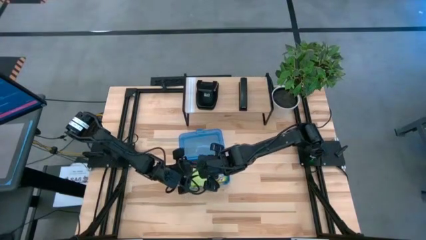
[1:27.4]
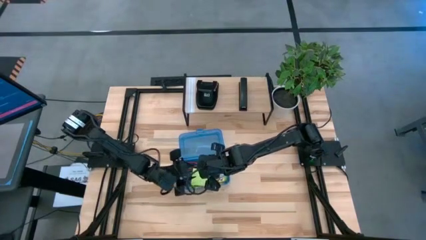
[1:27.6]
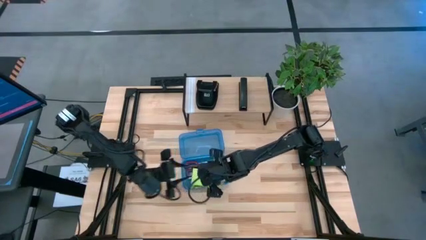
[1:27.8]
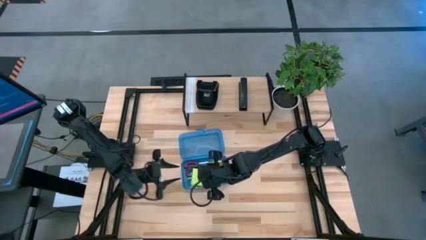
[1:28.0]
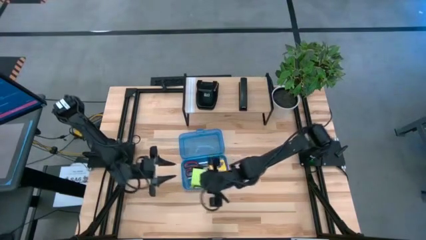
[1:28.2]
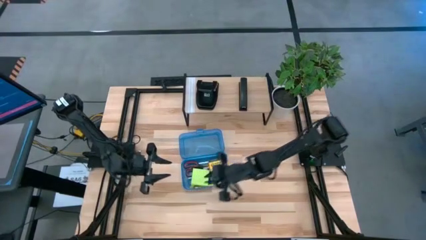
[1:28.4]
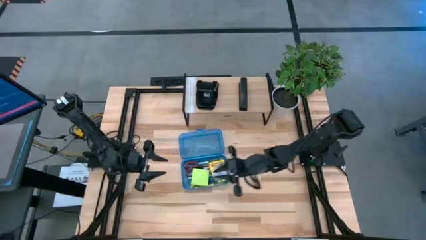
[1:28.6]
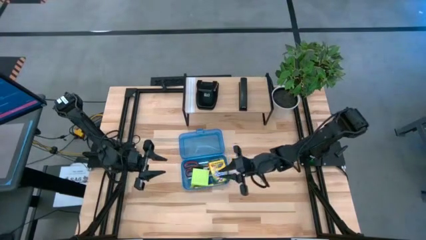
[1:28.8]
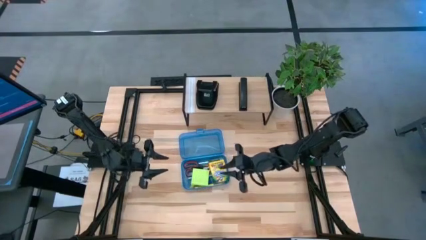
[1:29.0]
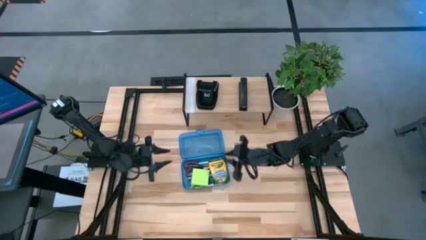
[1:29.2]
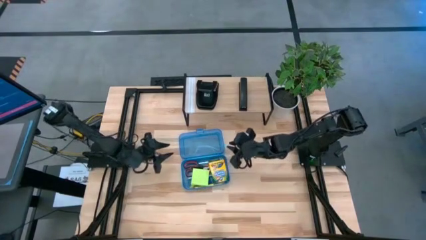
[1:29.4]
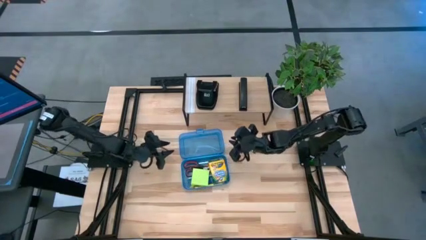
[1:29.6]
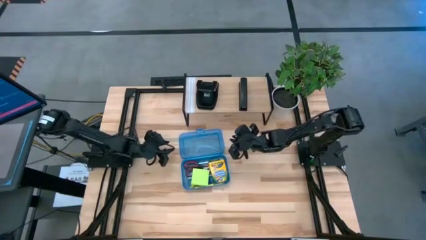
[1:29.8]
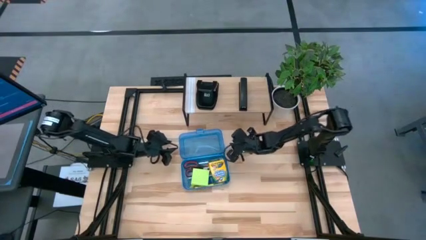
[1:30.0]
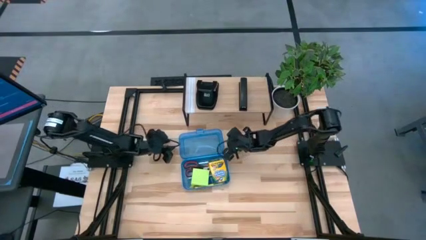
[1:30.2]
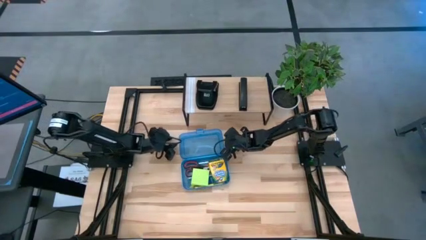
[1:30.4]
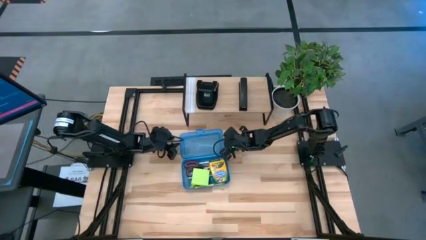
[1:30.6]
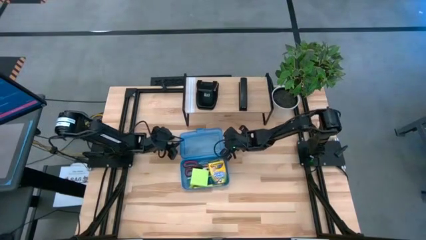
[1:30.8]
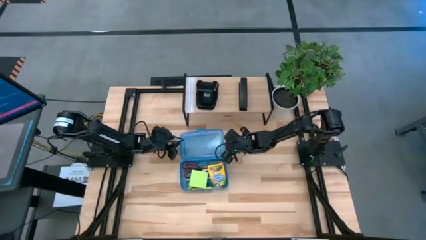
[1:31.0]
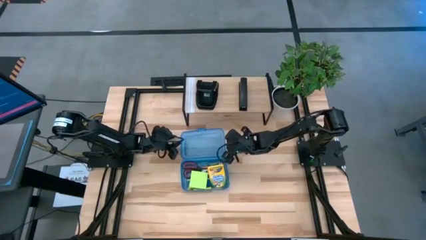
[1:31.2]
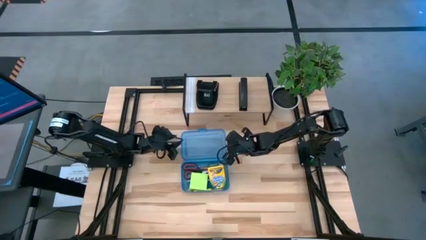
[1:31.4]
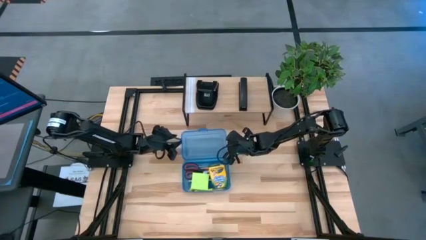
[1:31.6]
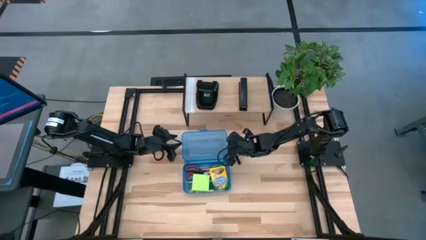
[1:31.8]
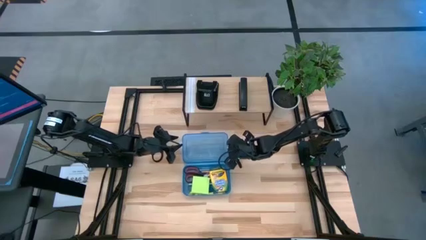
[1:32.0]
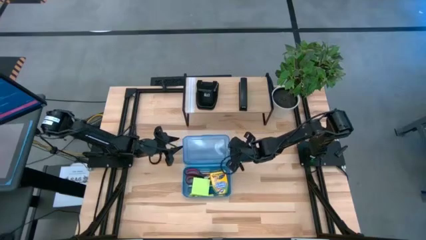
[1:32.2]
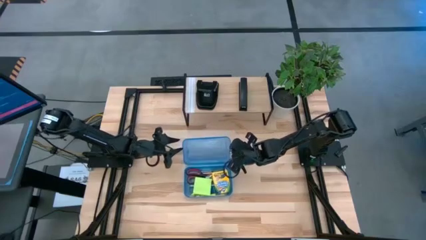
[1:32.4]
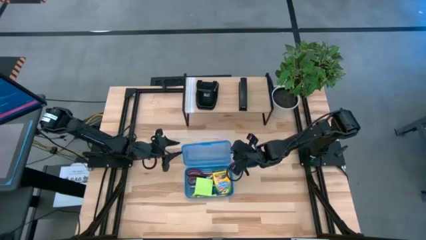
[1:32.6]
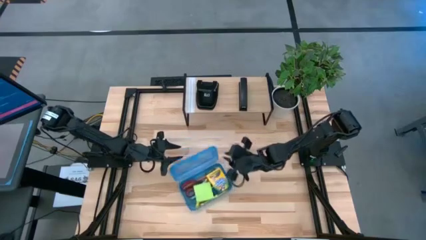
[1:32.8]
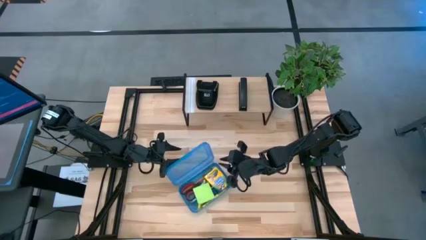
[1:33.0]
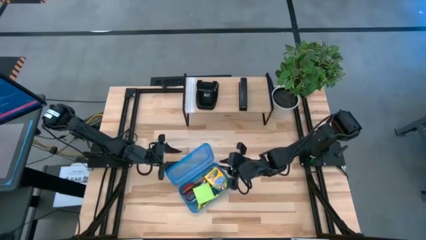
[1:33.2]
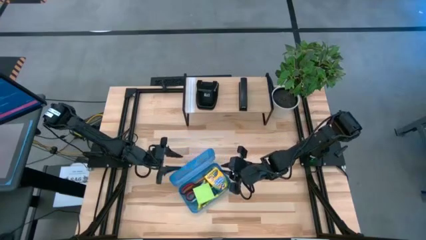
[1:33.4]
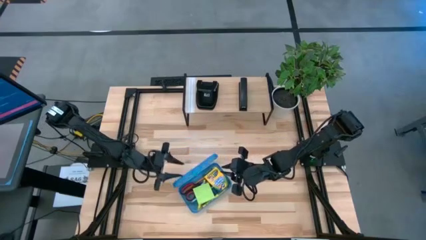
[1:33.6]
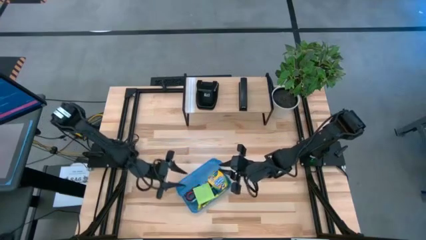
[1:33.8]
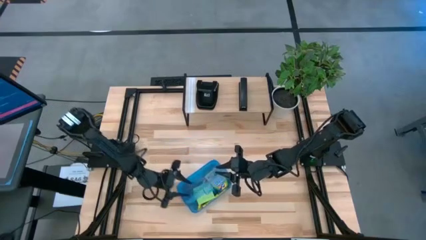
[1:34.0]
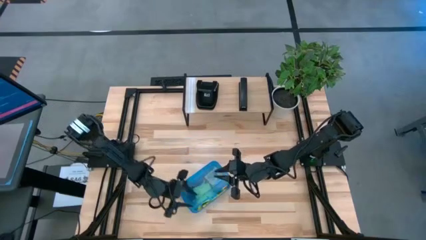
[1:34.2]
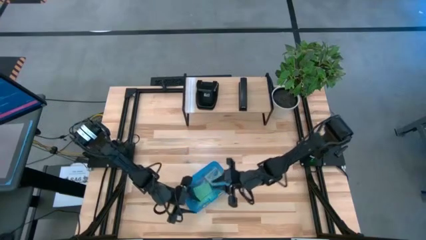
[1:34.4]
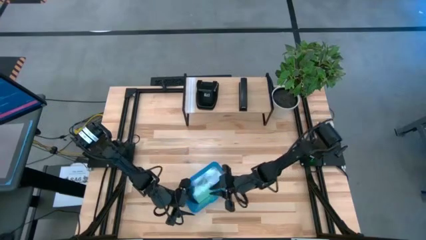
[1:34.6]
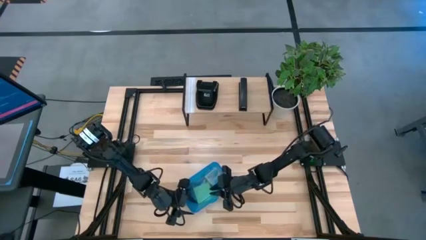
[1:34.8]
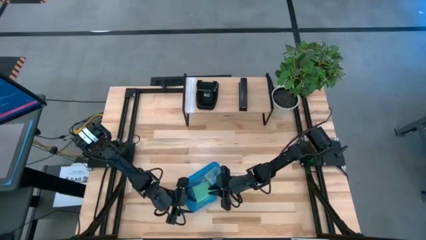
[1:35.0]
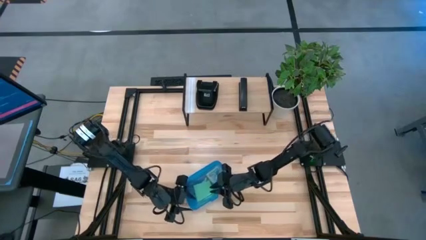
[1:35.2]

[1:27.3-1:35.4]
Task: Pack school essentials
Close the blue supply box

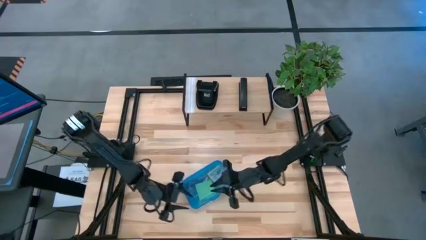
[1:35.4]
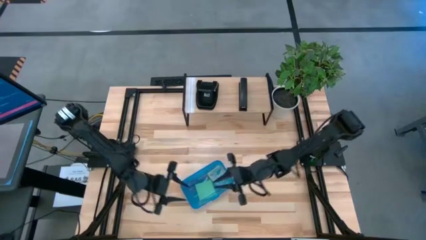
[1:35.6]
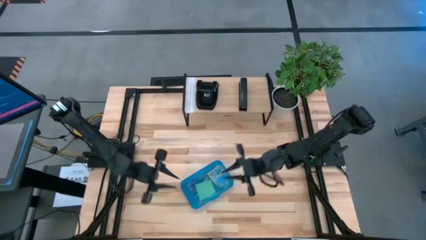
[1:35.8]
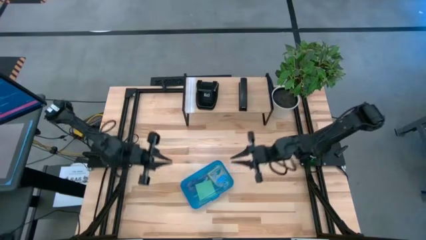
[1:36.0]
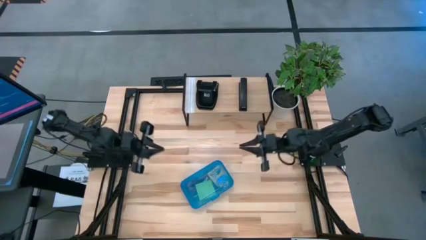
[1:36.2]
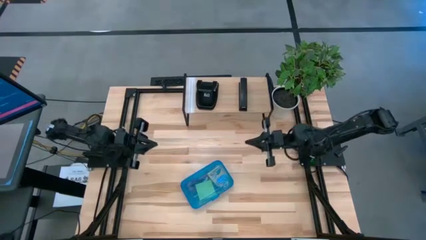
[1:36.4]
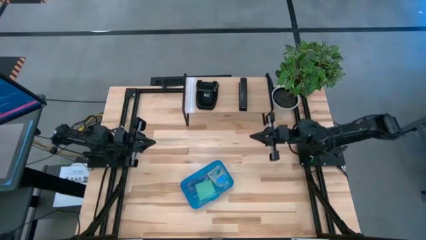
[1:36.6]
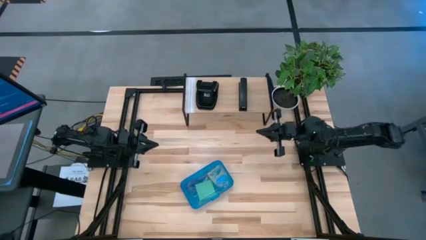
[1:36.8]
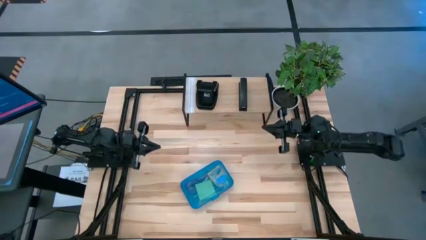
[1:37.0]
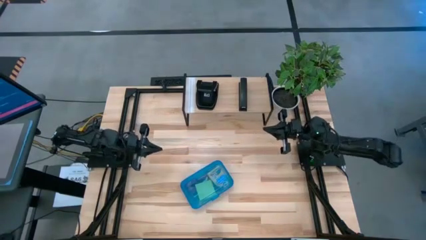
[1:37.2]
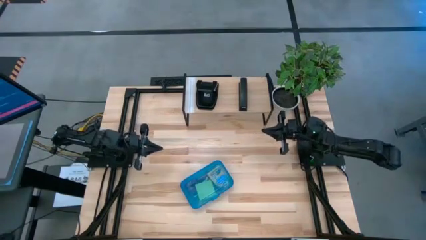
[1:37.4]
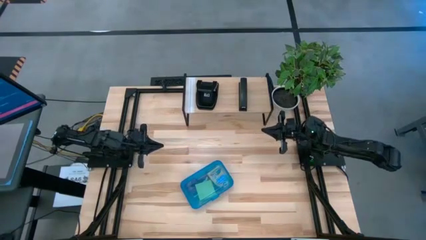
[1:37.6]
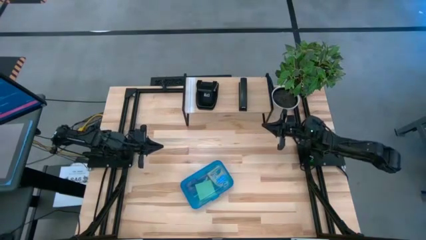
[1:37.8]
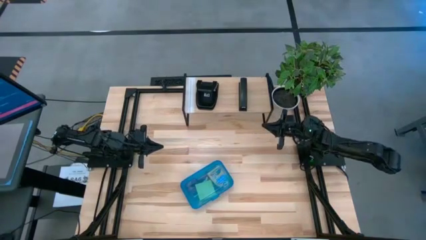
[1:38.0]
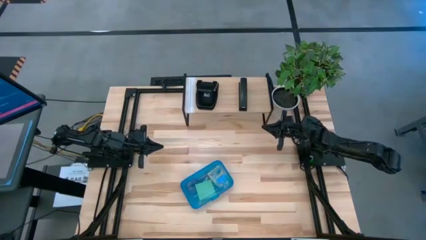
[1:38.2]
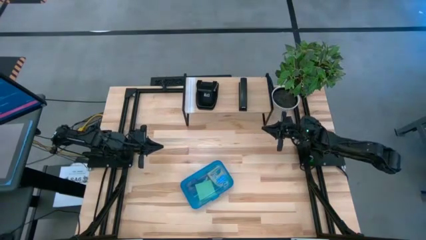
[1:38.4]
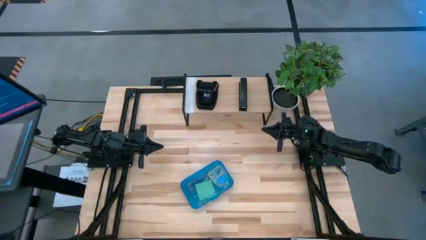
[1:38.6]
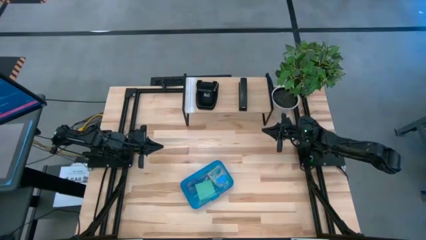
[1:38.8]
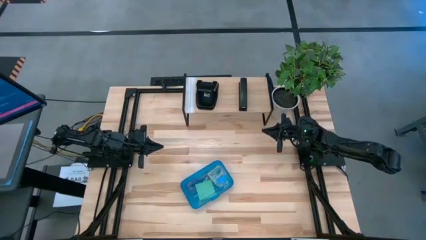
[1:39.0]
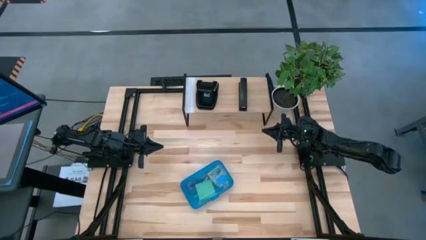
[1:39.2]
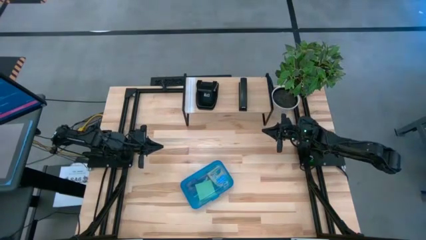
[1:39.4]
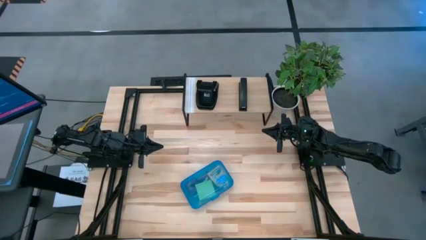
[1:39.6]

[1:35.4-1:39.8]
Return to Home Position

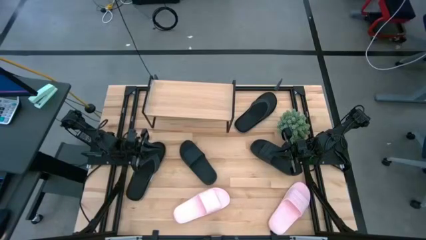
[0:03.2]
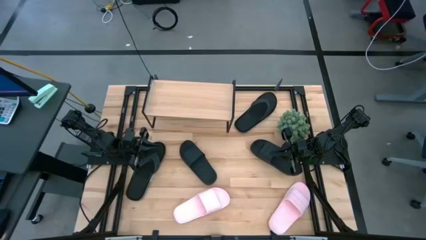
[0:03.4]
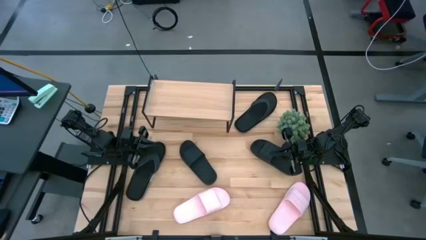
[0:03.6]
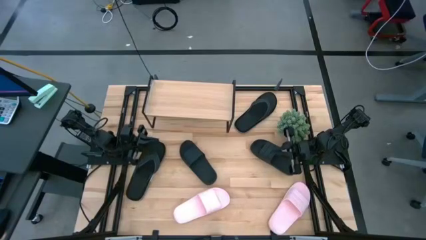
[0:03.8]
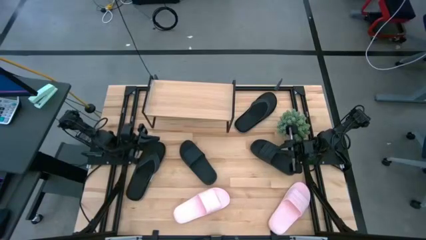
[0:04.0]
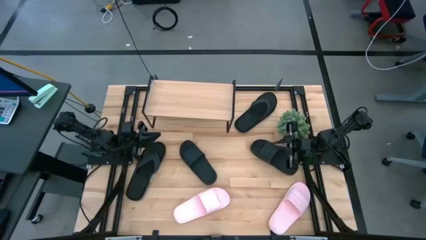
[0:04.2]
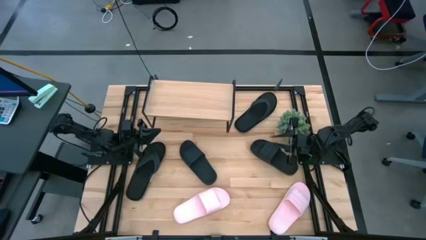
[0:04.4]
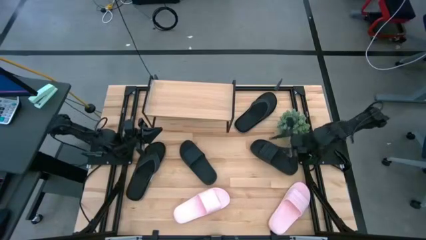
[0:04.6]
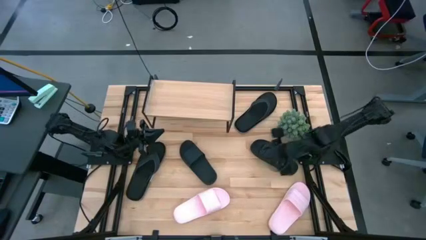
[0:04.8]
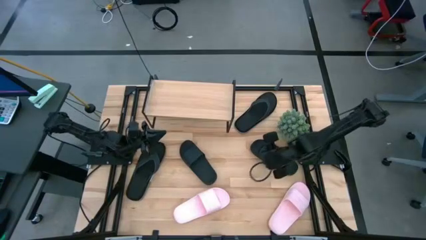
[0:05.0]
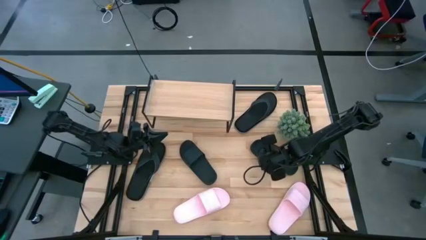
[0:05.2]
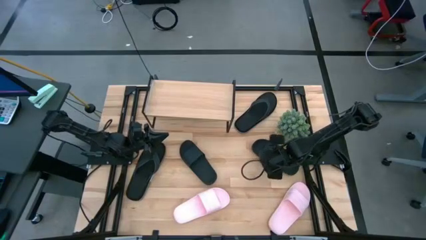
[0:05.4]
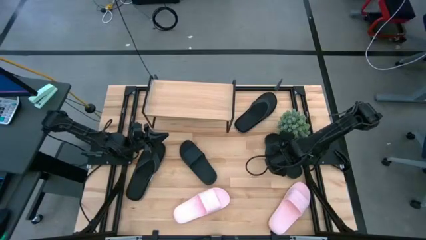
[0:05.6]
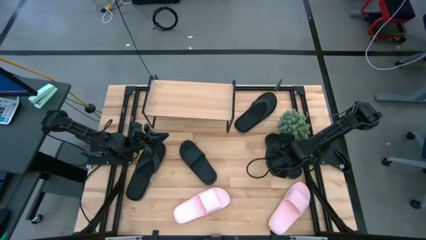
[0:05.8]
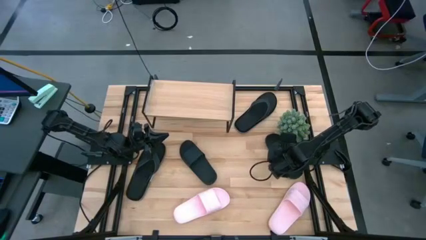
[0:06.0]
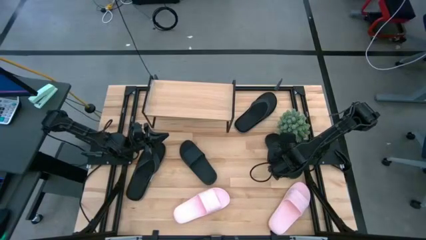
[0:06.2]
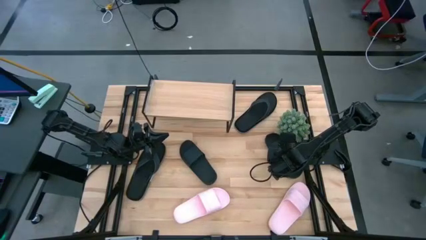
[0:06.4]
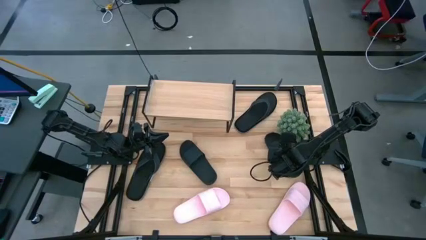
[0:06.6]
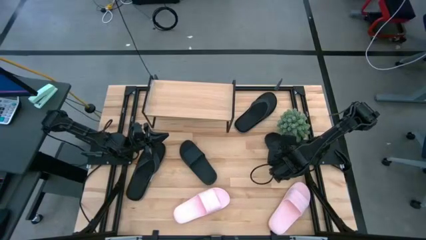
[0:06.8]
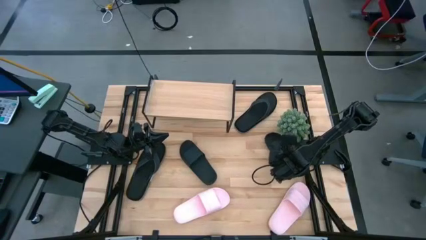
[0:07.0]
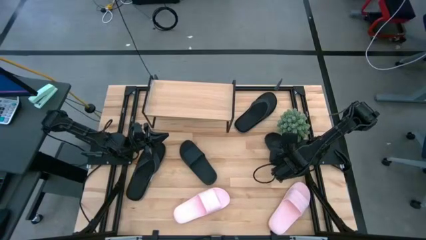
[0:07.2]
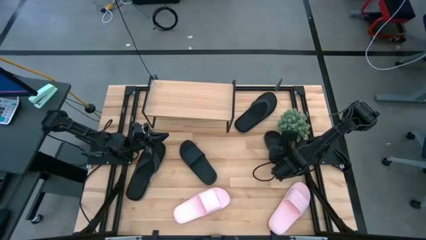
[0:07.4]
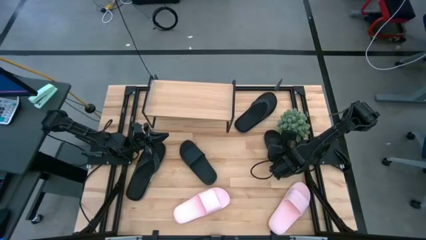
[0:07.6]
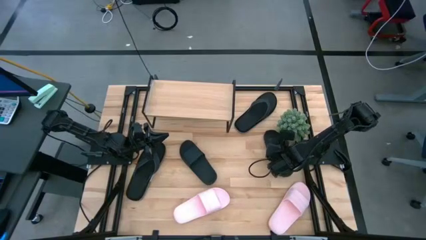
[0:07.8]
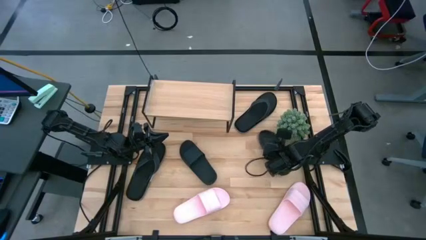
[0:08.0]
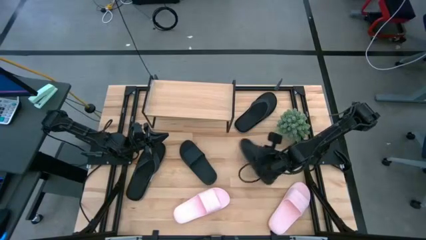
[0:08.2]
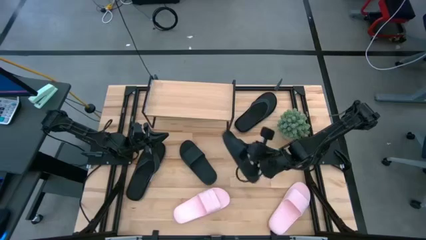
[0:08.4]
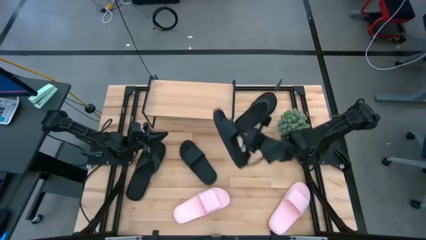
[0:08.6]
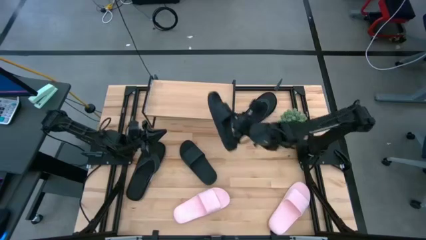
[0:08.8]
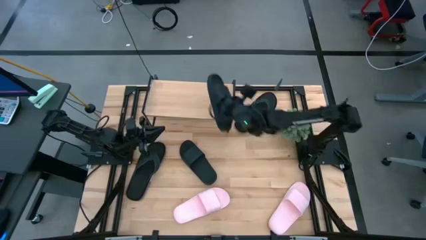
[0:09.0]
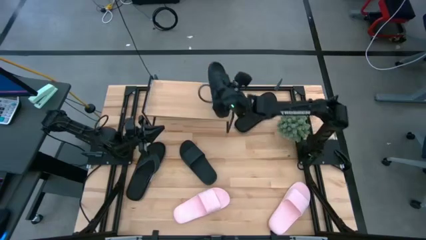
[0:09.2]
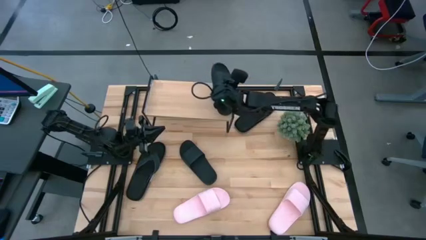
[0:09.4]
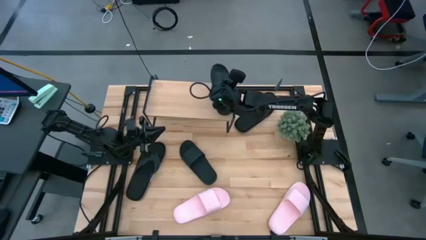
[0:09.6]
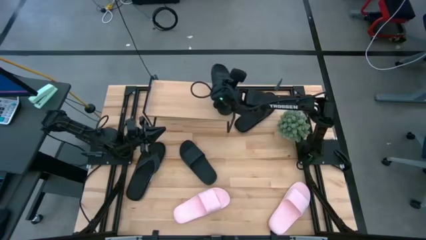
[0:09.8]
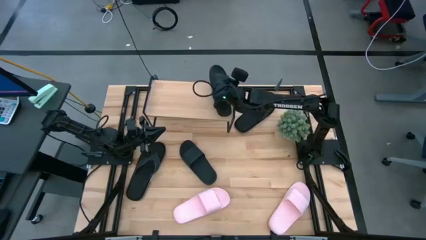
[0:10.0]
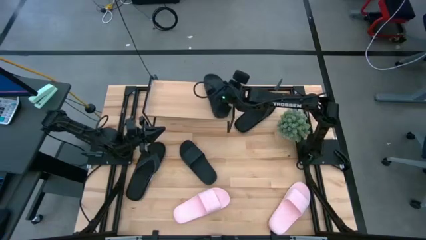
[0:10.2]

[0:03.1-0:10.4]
Task: Pick and place slides into the shelf
Put the right black slide on the shelf
